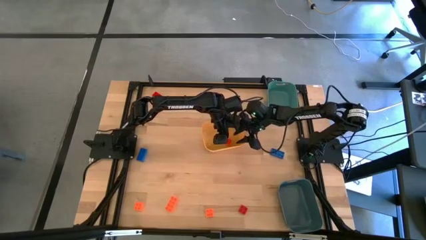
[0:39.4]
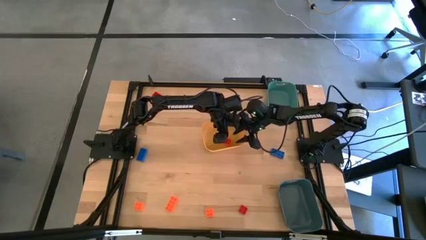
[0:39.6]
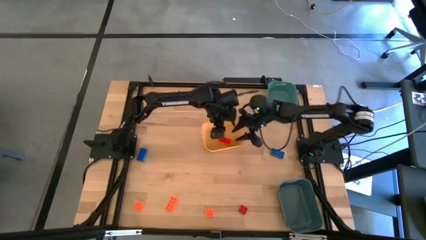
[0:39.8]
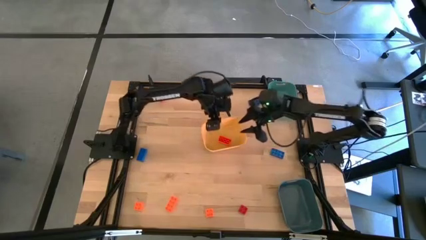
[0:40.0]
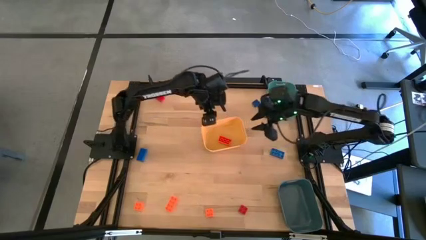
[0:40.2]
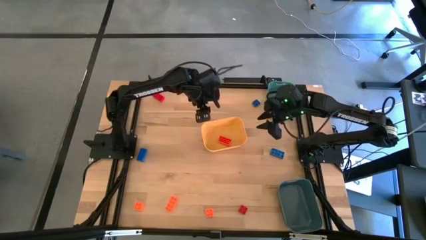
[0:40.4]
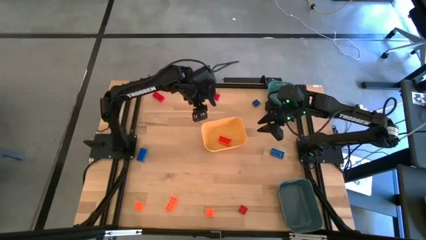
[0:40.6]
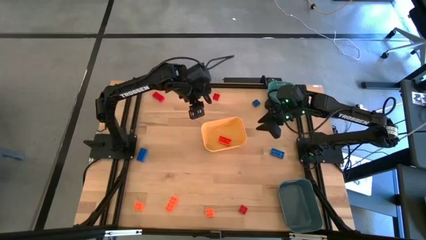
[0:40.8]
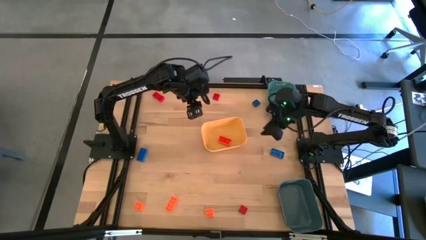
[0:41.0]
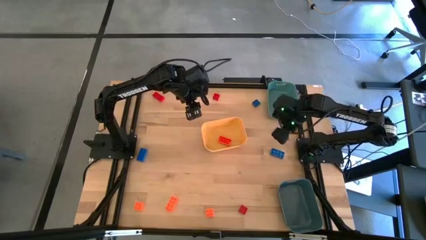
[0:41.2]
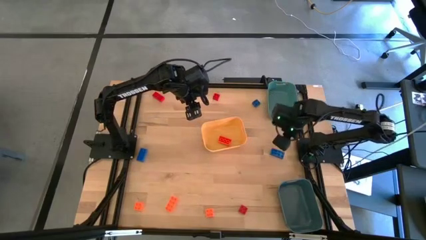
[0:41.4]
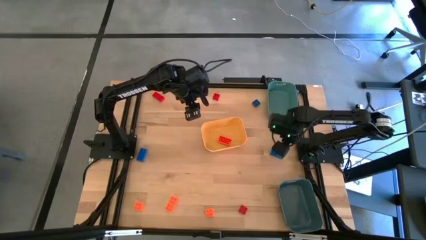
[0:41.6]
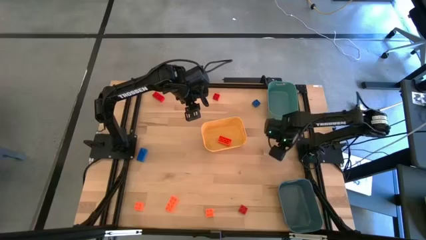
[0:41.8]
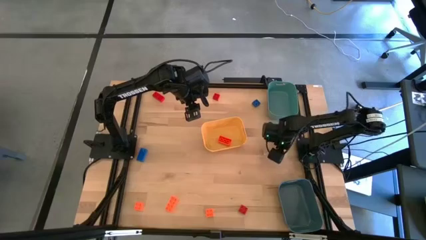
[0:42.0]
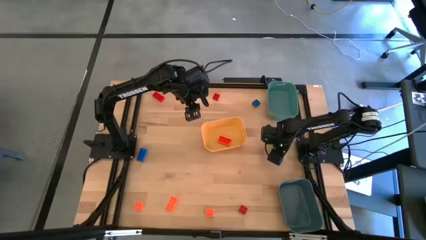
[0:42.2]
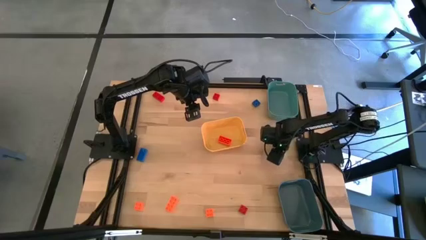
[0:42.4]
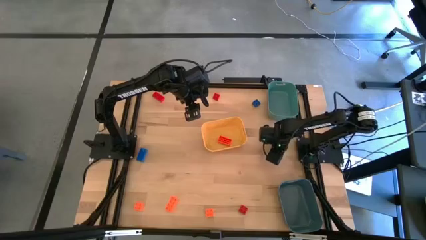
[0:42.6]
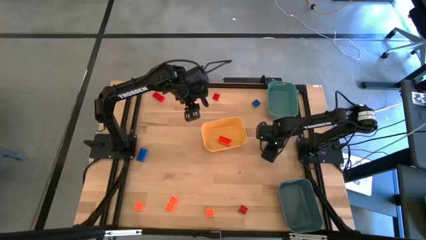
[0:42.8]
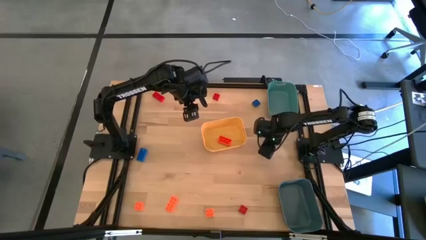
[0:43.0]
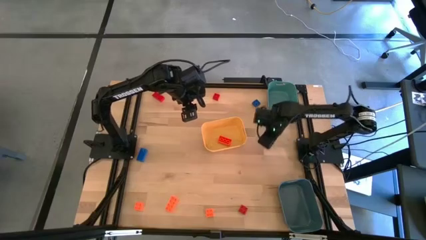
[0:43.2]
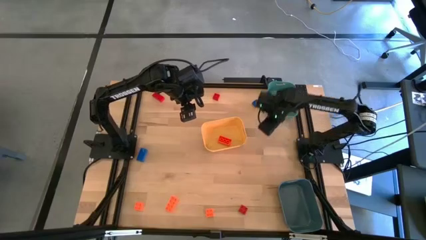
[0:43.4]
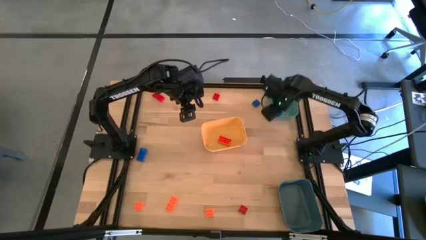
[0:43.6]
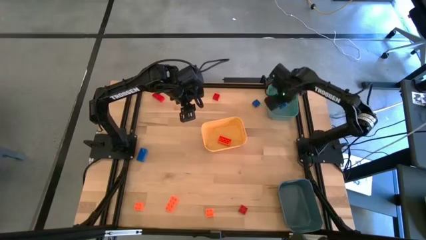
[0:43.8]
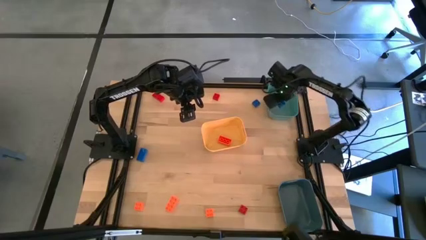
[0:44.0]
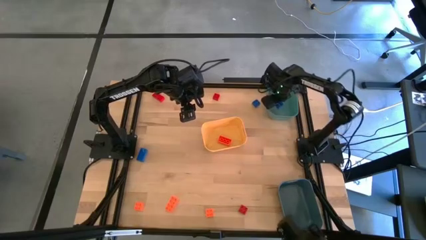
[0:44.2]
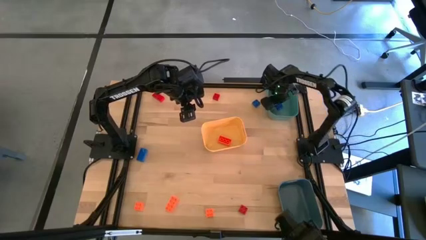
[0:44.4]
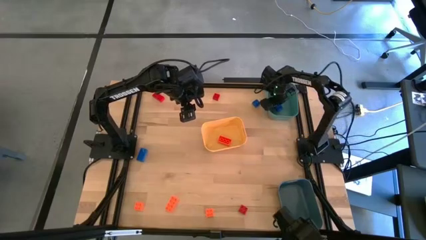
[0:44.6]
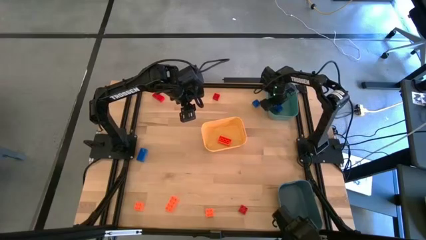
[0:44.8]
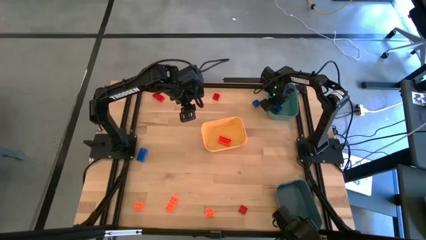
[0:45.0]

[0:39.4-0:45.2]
Task: Sort & place blocks by color
Put the blue game piece into the green bin

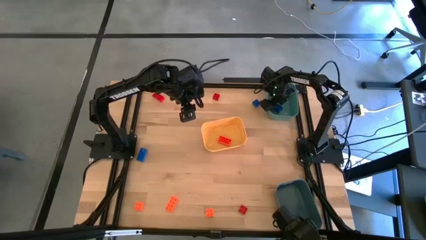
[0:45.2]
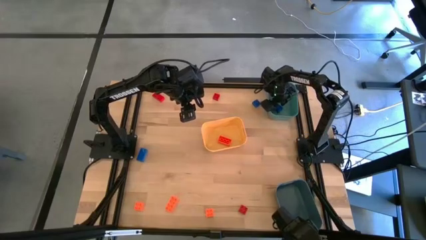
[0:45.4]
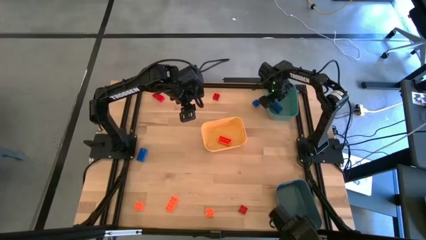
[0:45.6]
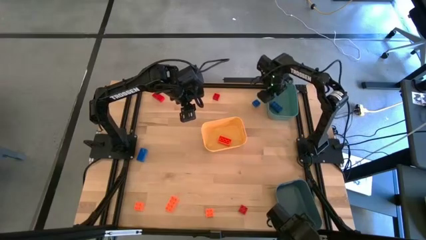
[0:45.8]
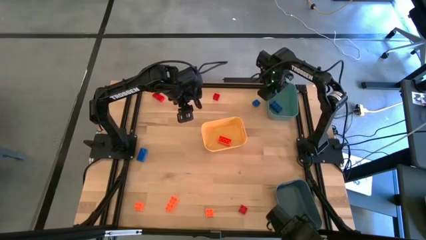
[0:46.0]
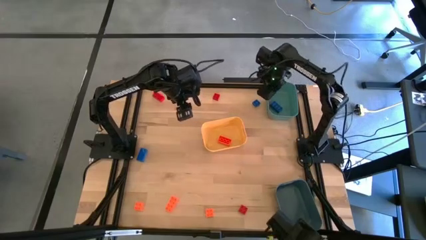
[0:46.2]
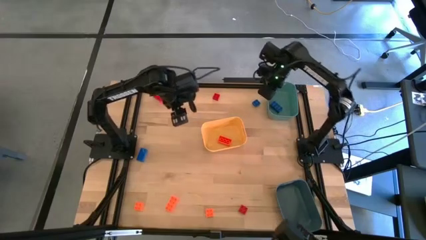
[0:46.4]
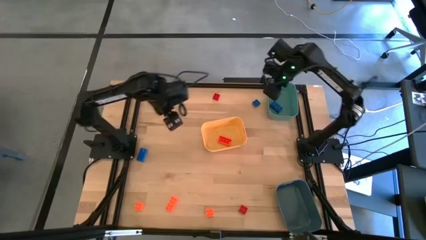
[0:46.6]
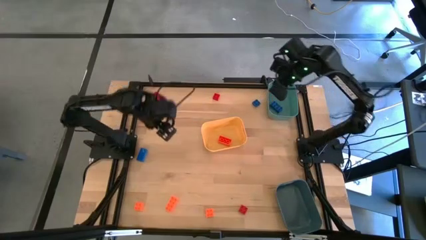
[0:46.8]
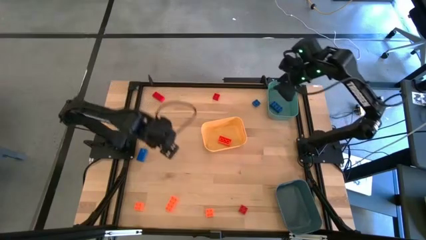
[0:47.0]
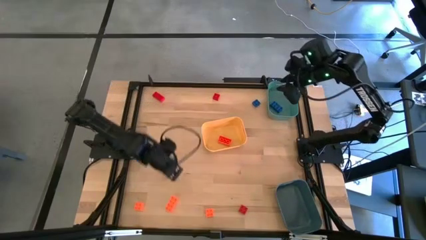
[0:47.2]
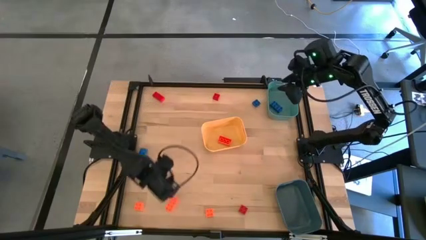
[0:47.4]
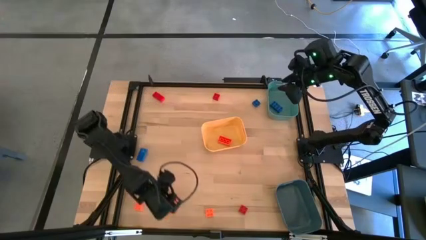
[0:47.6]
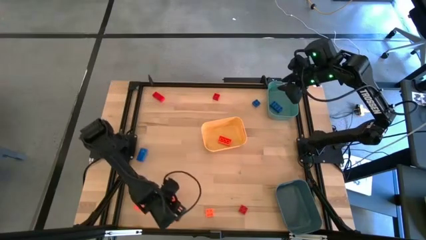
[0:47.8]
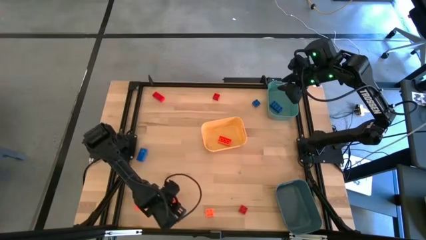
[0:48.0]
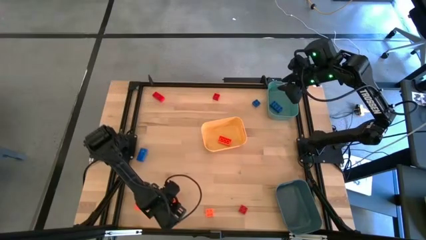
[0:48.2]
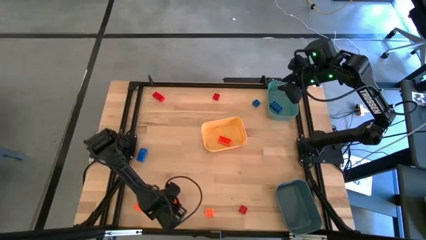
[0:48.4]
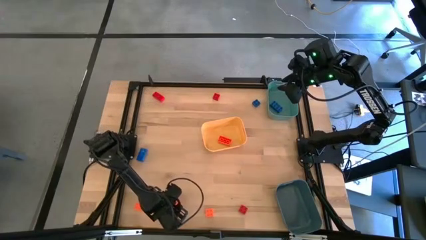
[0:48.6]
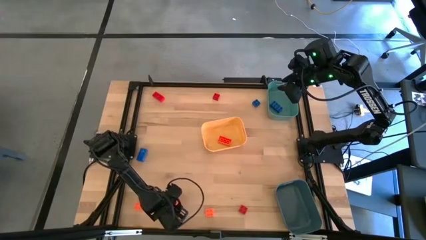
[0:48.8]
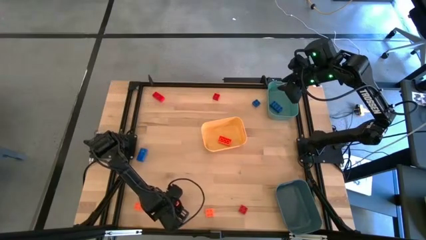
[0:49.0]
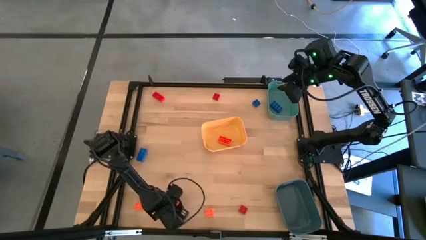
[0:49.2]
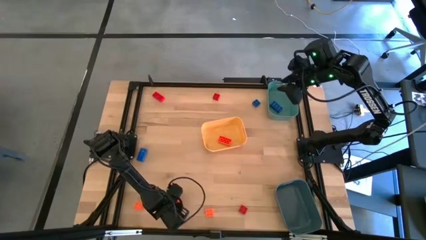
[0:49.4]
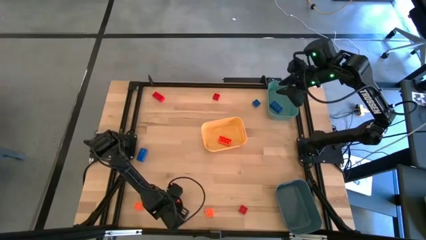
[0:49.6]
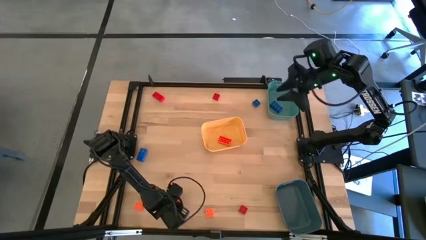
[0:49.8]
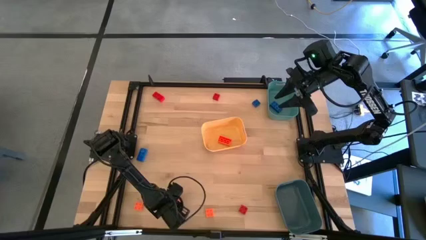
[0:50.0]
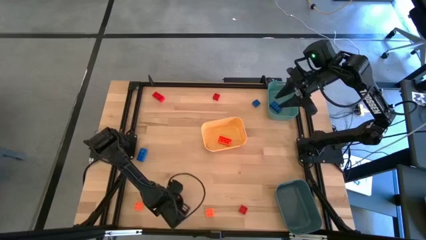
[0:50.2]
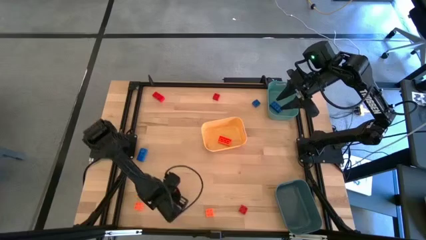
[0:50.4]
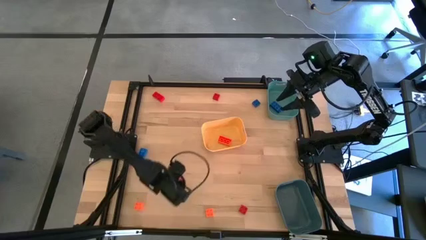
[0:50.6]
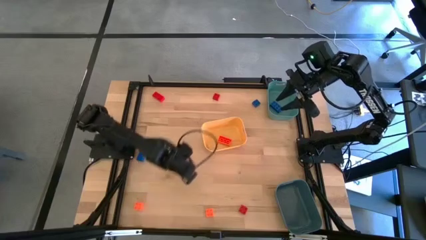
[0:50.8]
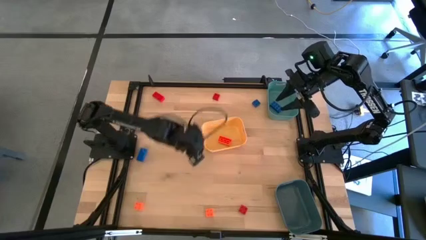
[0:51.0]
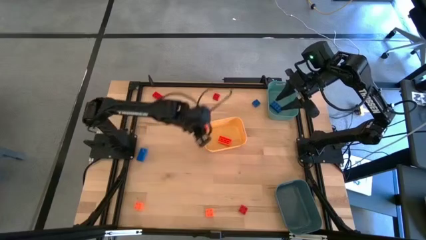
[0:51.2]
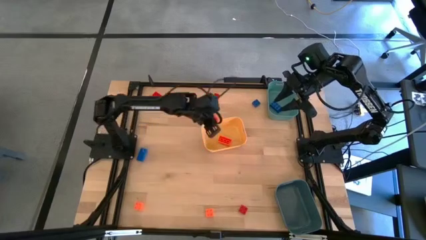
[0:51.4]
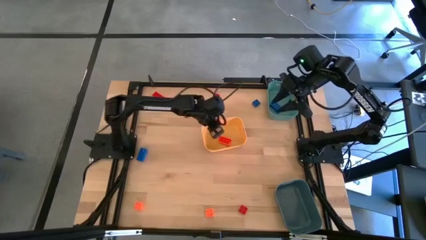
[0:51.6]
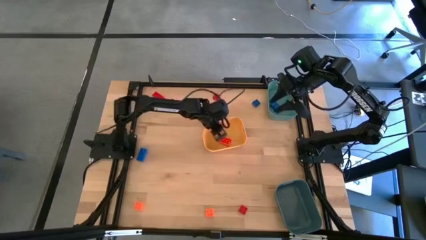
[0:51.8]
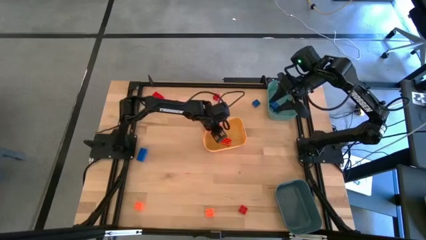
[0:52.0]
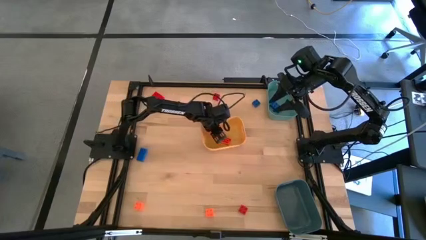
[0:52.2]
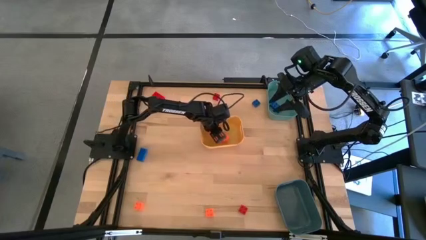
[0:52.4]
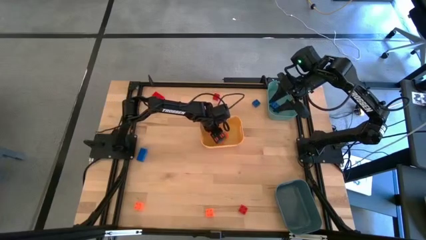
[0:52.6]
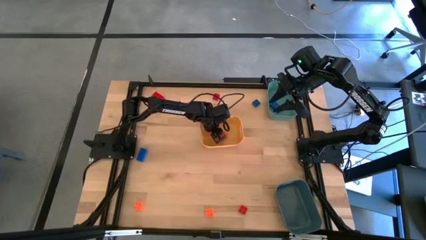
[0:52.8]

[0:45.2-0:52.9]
Put the orange game piece into the yellow bin
